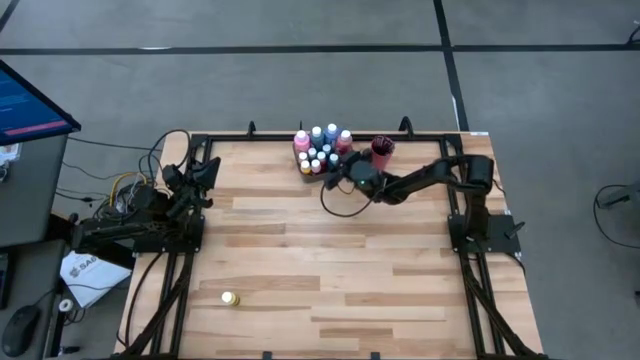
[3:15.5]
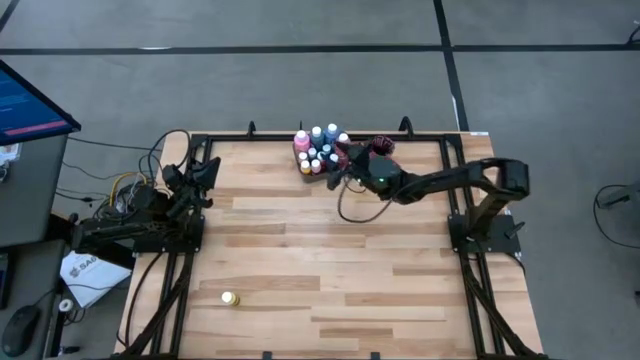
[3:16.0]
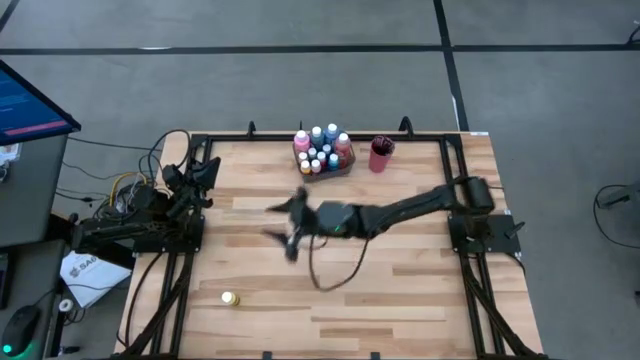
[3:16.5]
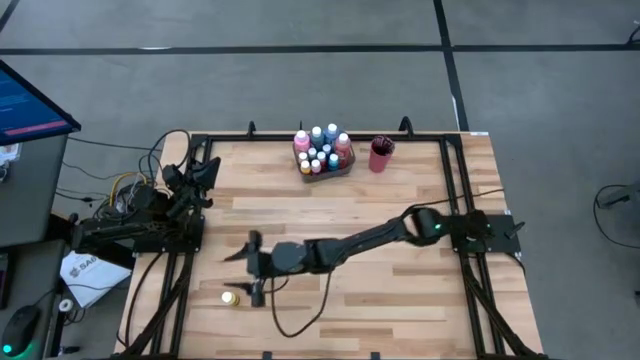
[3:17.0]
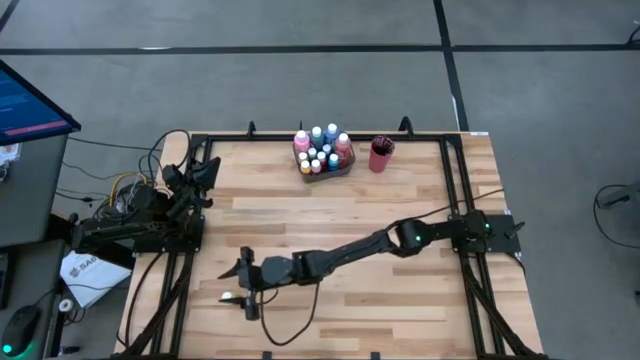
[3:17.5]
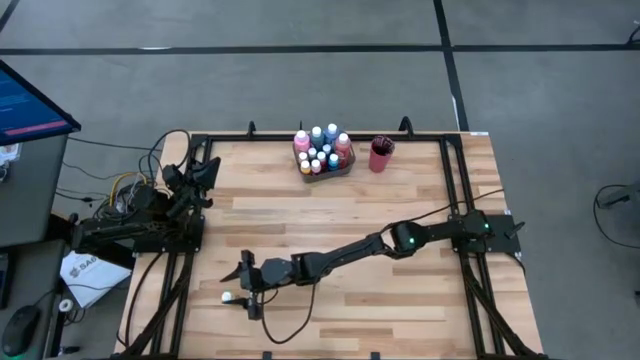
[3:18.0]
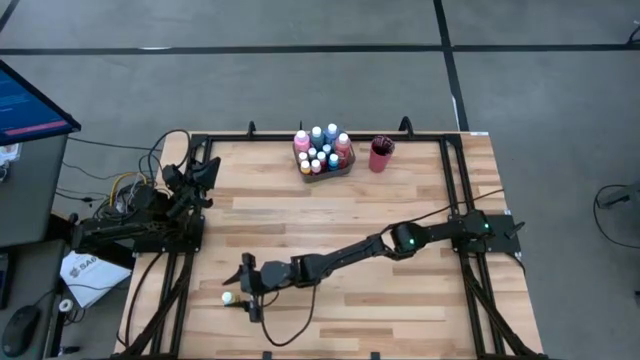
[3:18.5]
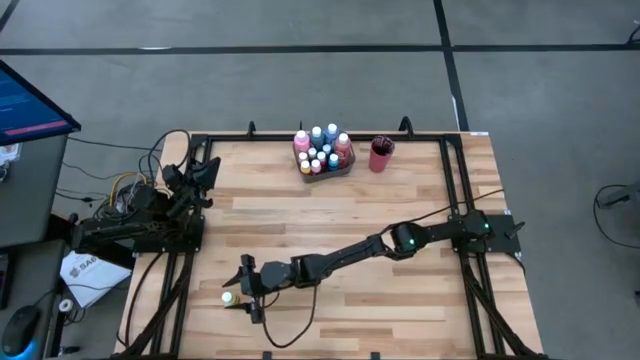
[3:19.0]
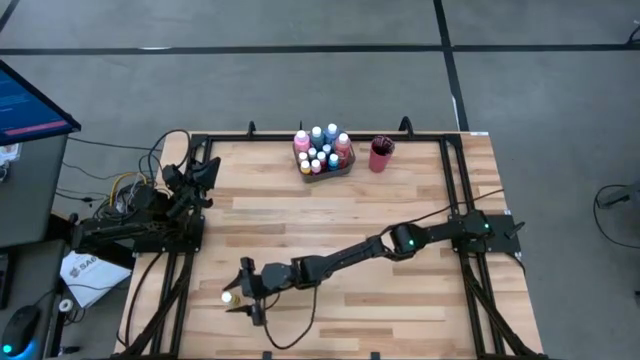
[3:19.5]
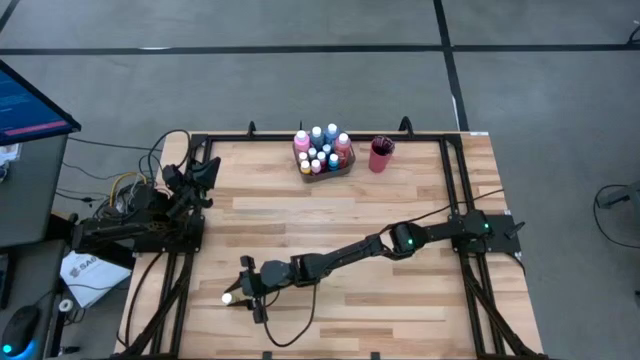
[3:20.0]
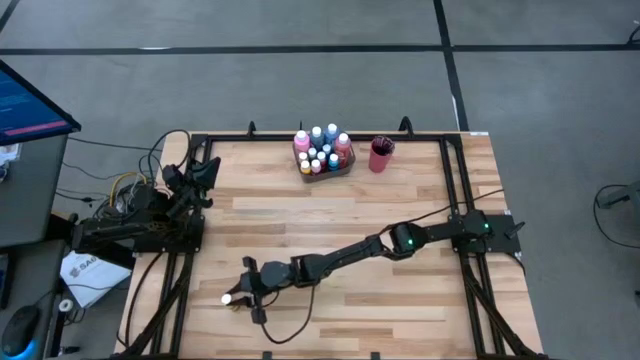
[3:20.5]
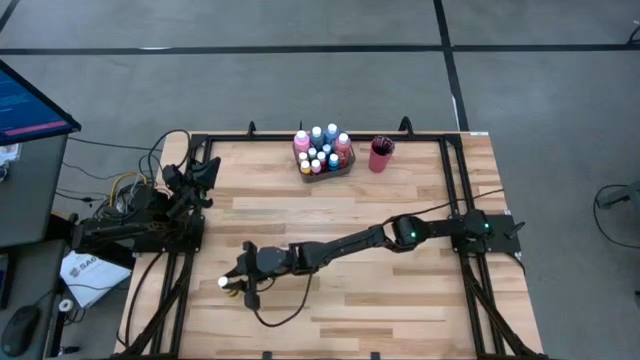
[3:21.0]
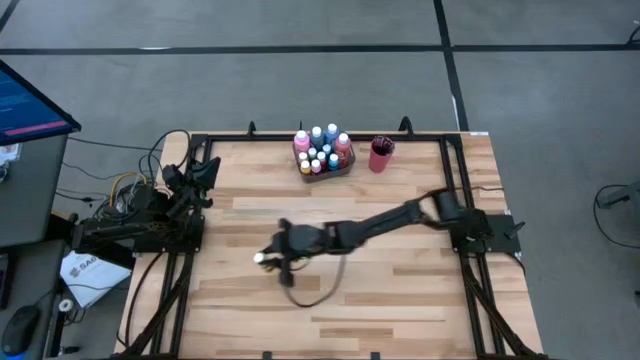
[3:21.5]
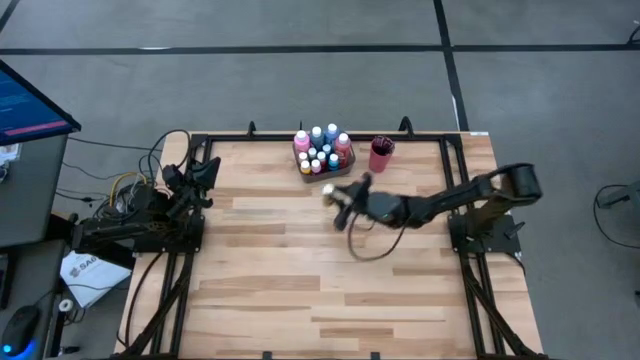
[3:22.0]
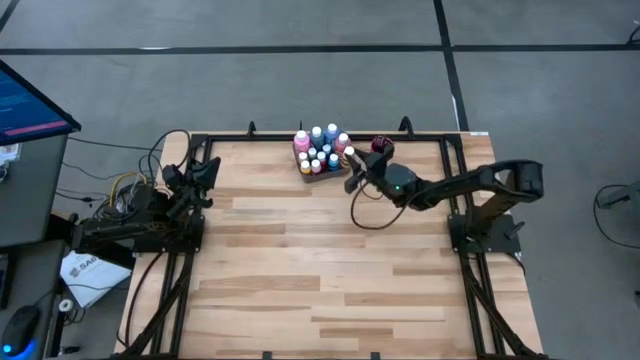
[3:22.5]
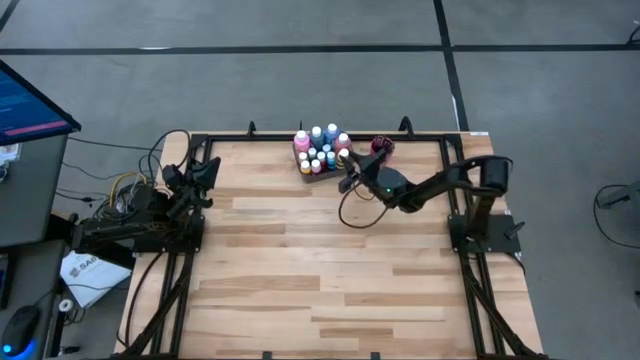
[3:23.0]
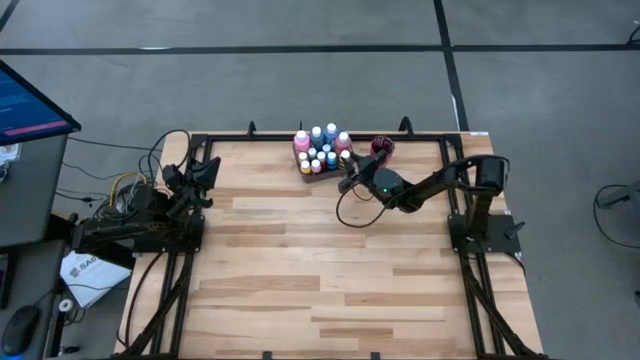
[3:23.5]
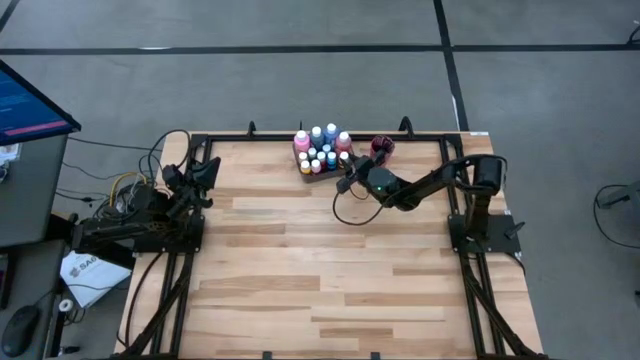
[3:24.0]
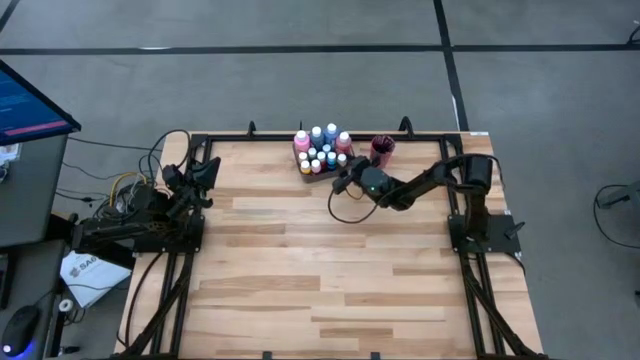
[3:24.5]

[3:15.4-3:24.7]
Task: Pick & Place Paint Supplies
Put the yellow paint bottle into the gray bin

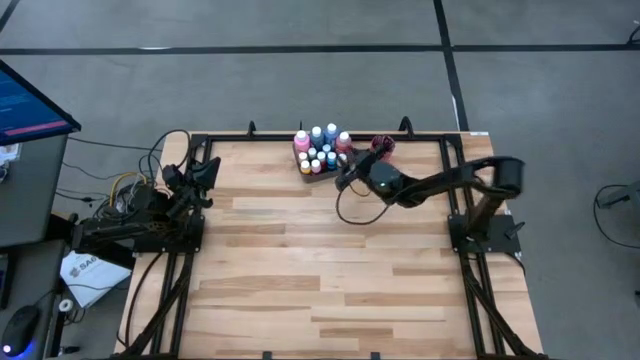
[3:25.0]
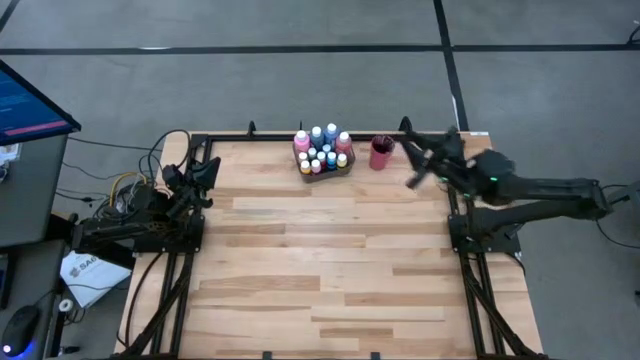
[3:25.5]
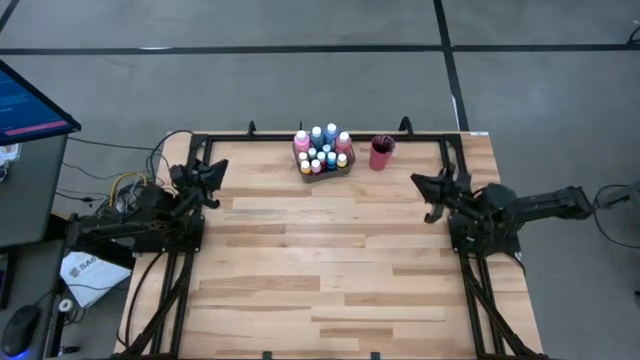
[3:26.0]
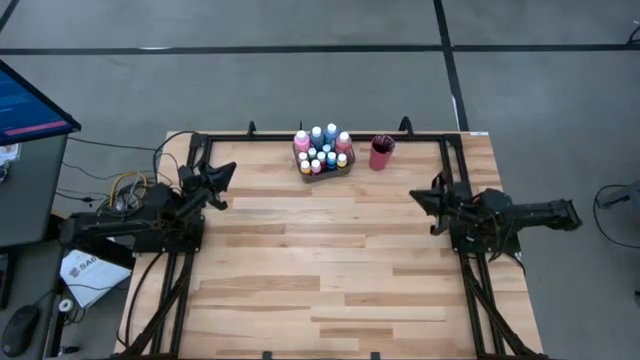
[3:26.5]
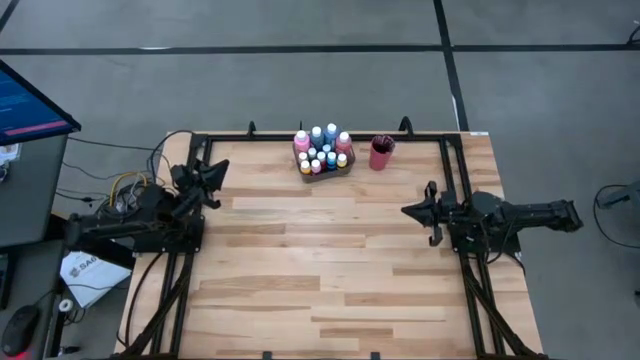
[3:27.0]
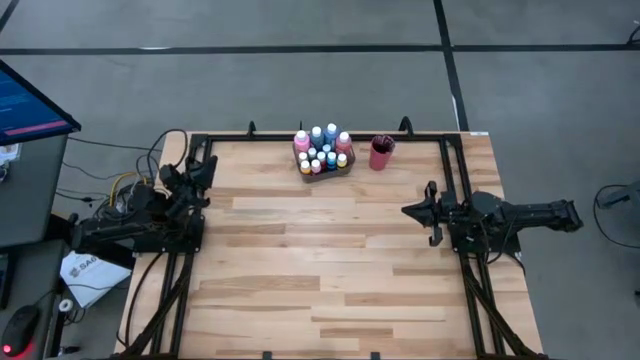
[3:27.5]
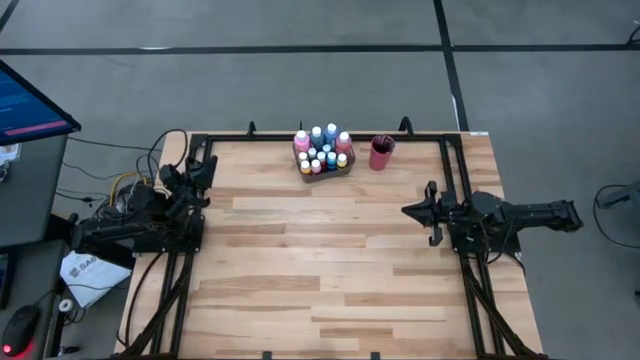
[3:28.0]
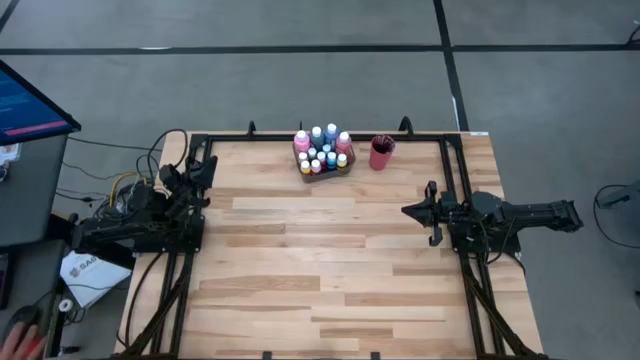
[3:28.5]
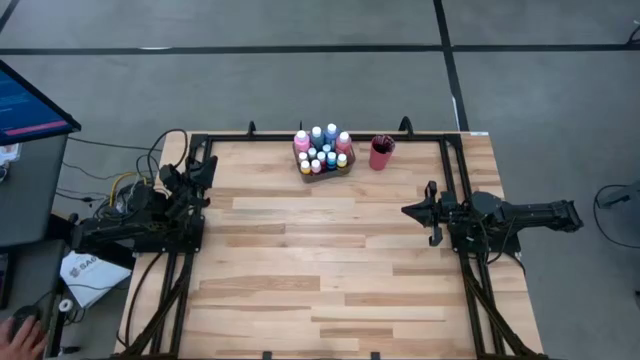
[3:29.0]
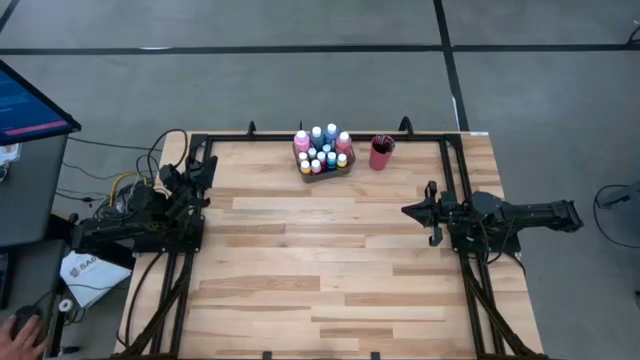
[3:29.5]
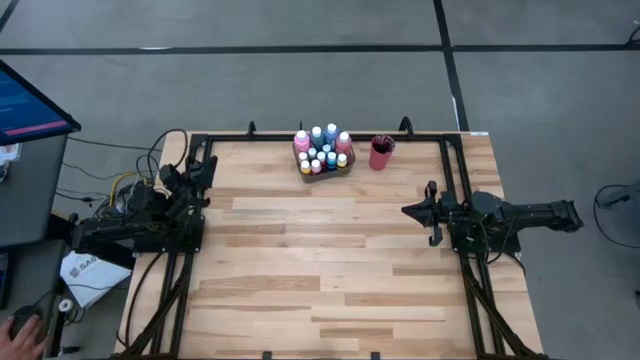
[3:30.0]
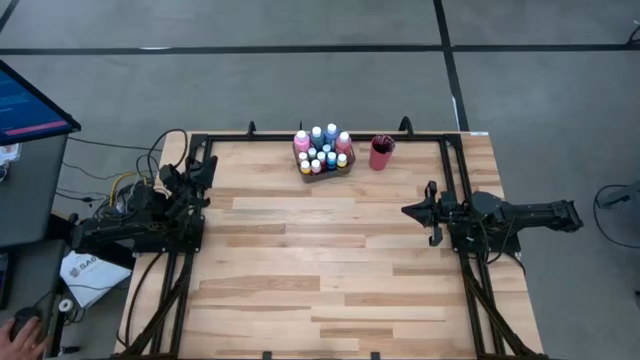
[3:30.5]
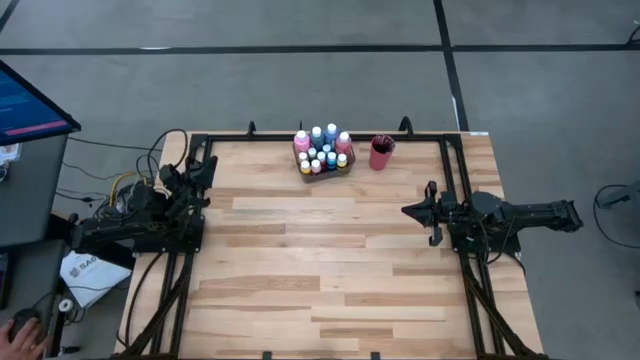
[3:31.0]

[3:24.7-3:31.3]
Return to Home Position
